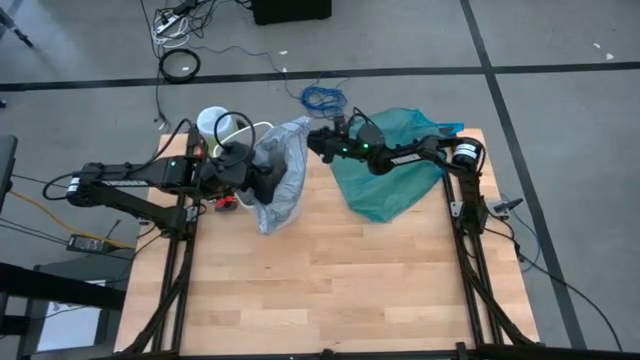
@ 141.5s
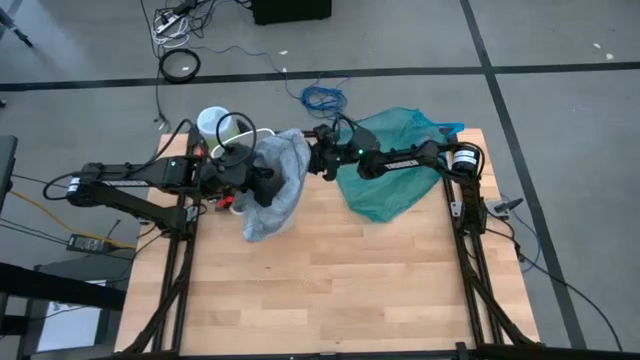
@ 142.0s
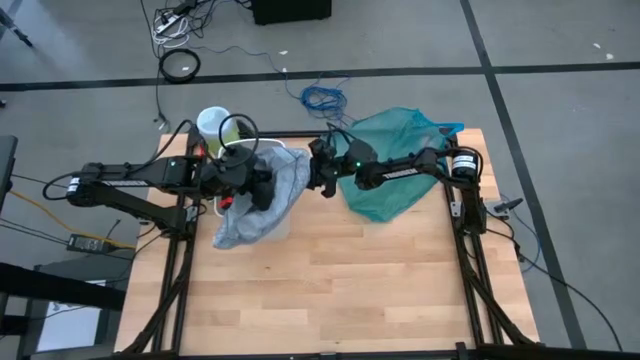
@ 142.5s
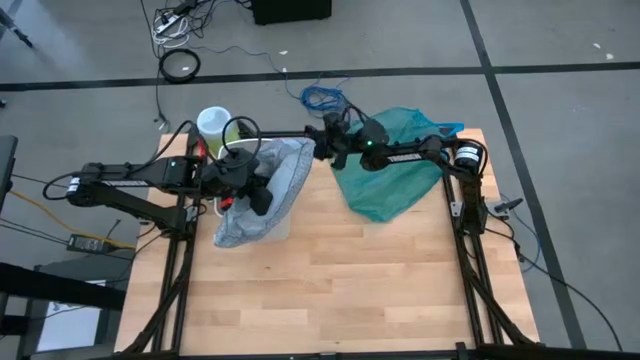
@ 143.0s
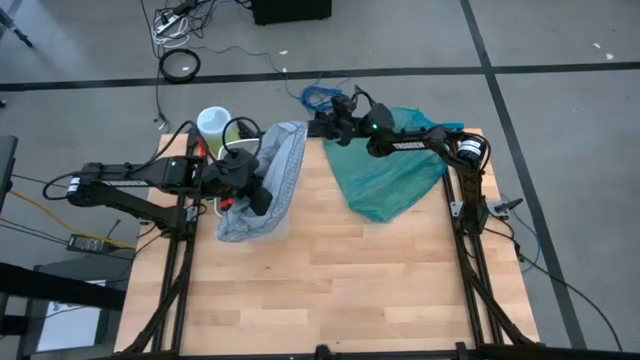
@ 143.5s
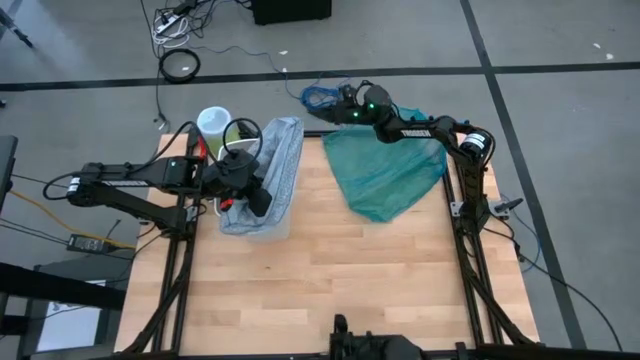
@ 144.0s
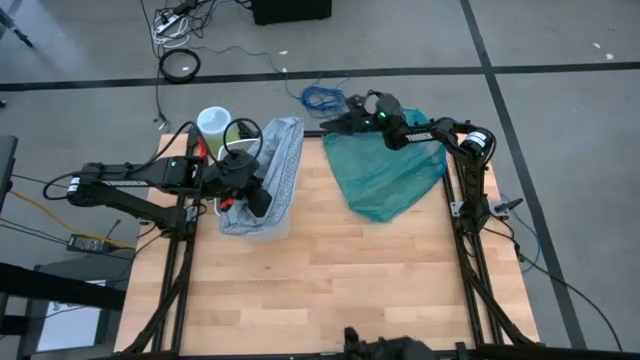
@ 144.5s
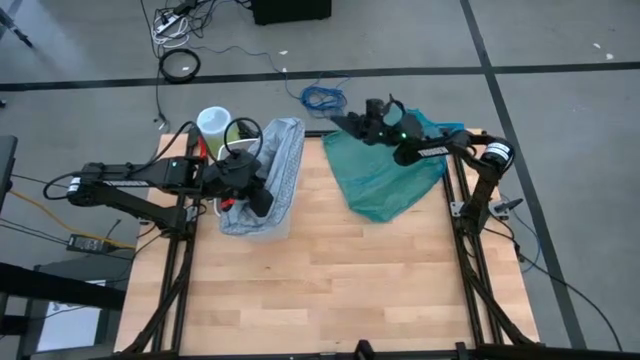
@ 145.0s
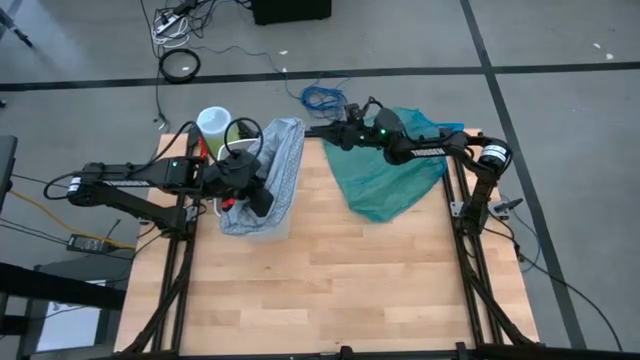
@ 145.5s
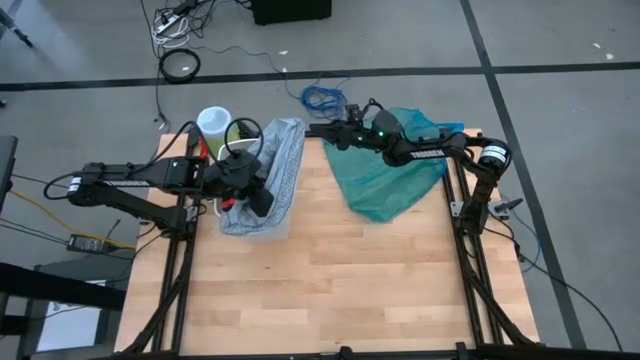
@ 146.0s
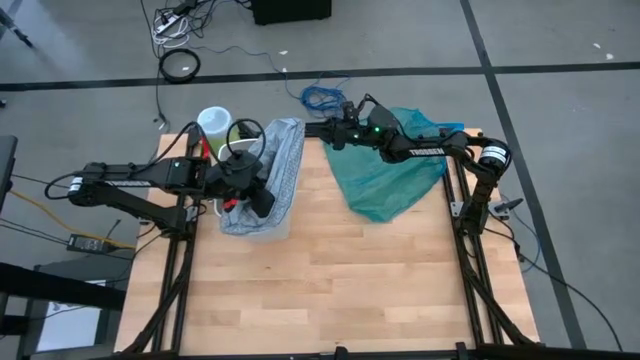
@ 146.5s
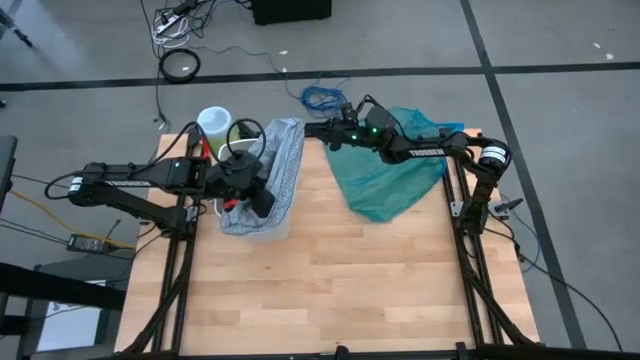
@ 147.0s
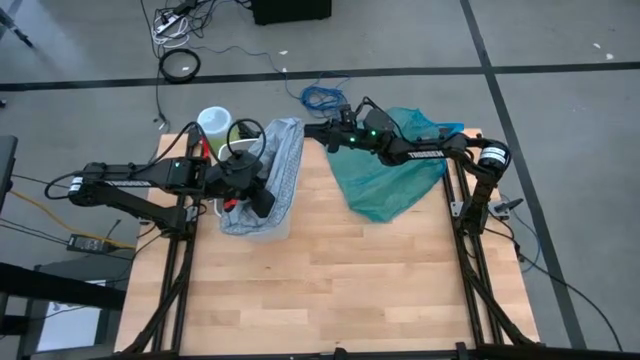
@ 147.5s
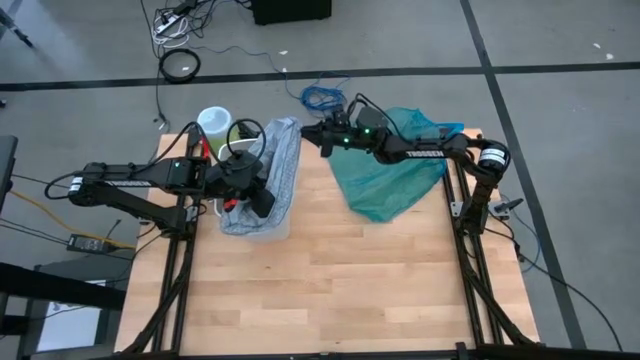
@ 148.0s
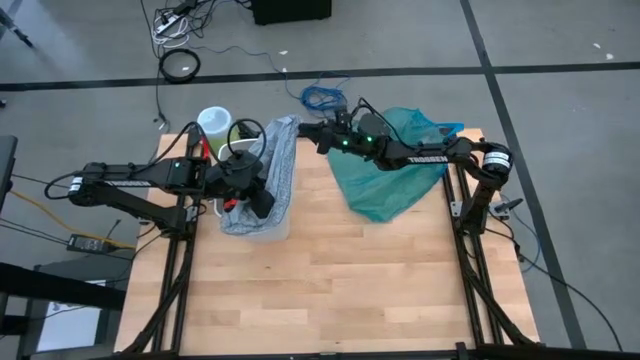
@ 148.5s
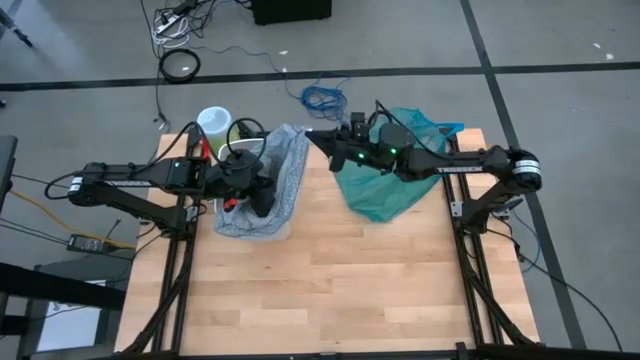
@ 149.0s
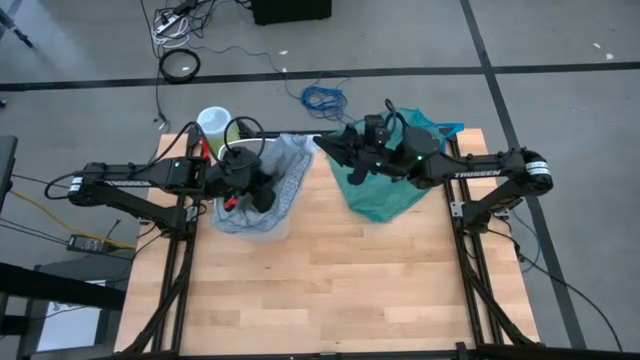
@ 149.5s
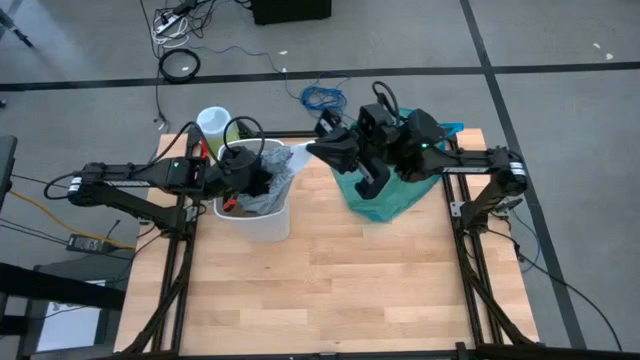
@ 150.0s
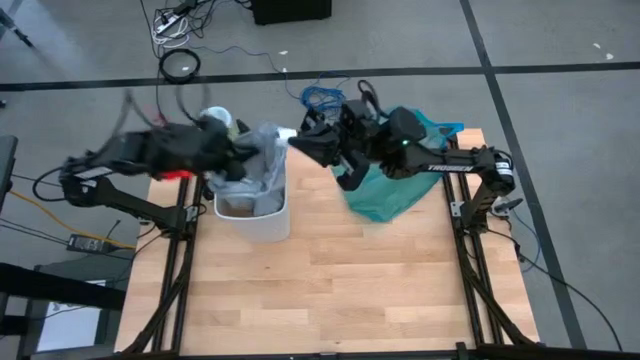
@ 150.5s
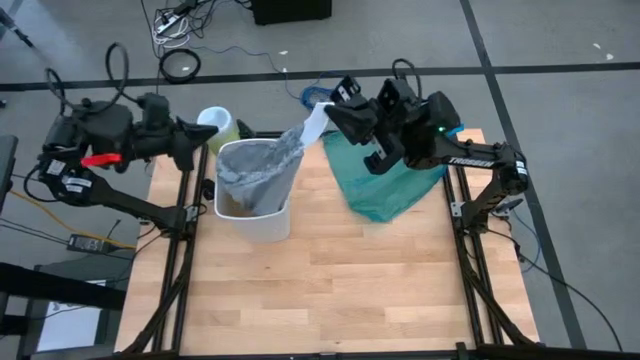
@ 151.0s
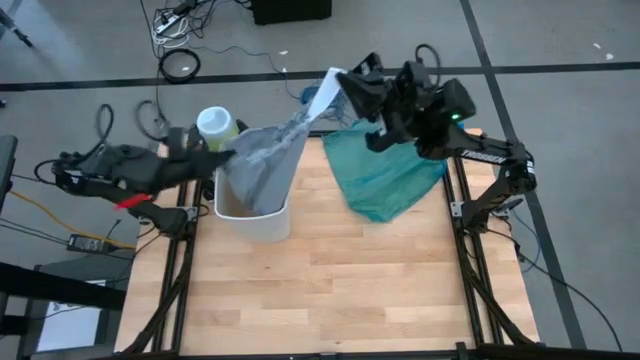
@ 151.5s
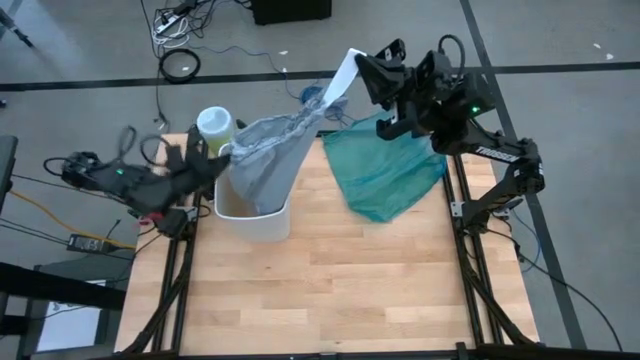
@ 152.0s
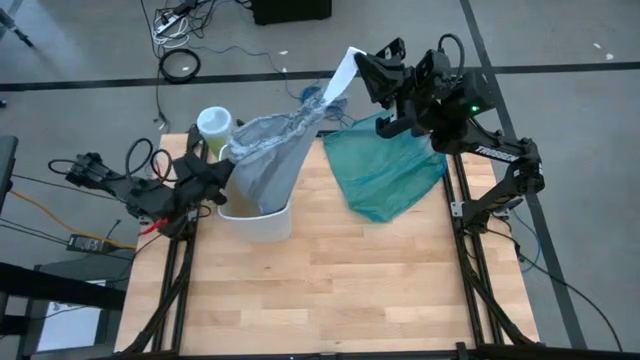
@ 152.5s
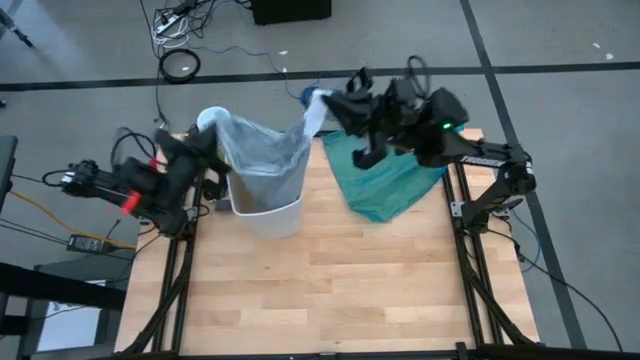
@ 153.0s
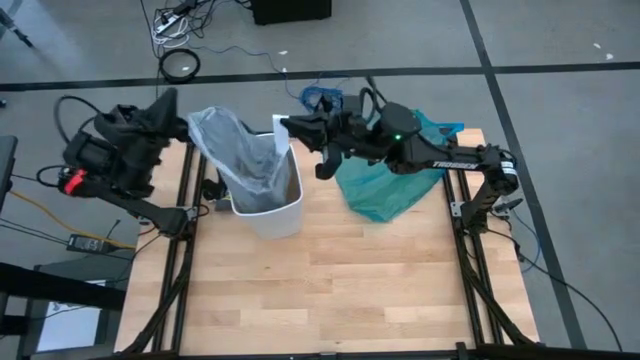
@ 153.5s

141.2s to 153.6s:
Task: place trash/remove bag and relplace
Remove the light blue trash bag from the trash bin

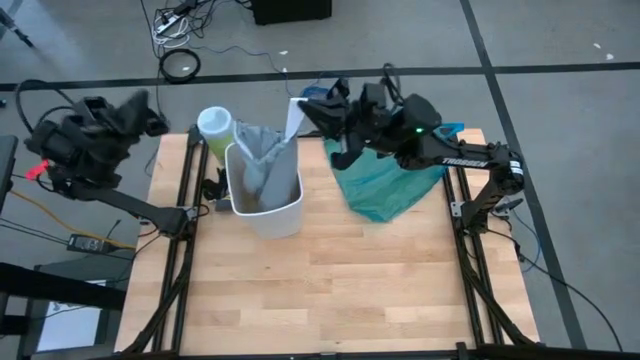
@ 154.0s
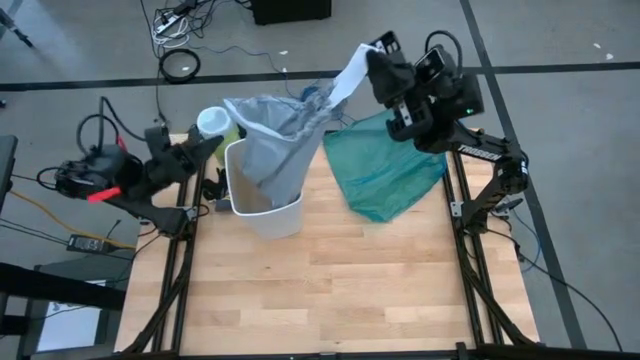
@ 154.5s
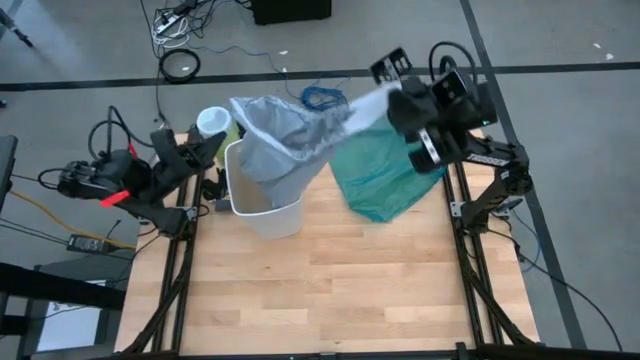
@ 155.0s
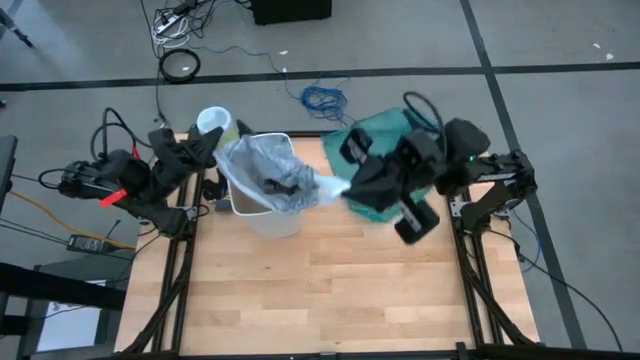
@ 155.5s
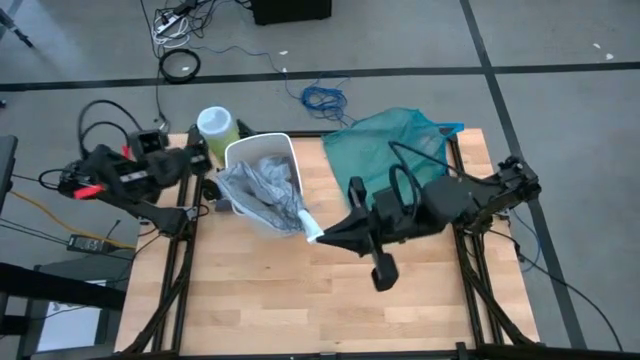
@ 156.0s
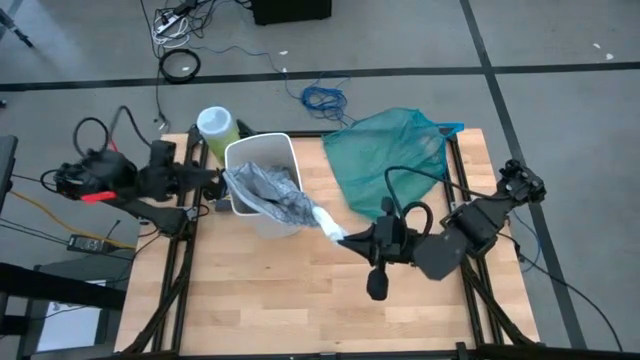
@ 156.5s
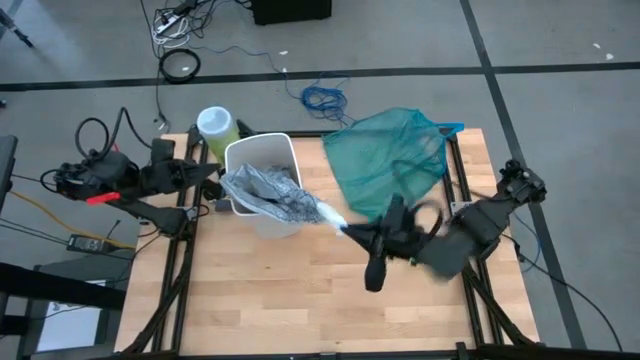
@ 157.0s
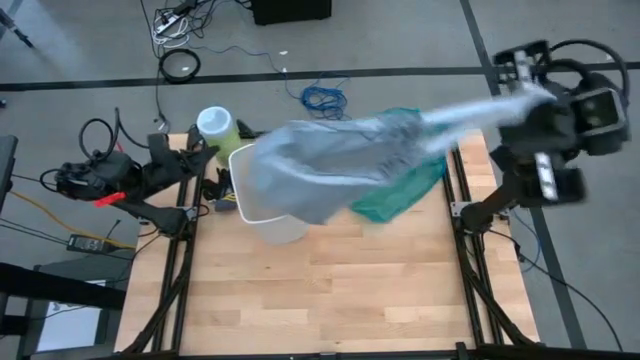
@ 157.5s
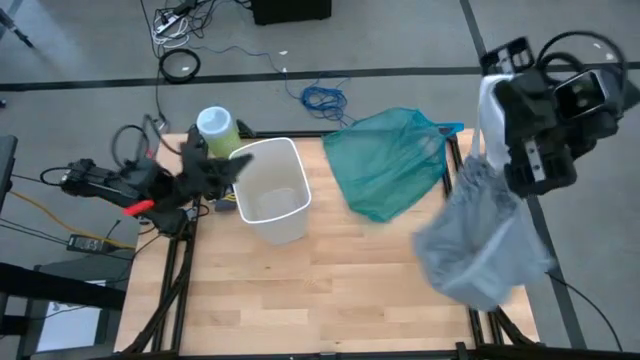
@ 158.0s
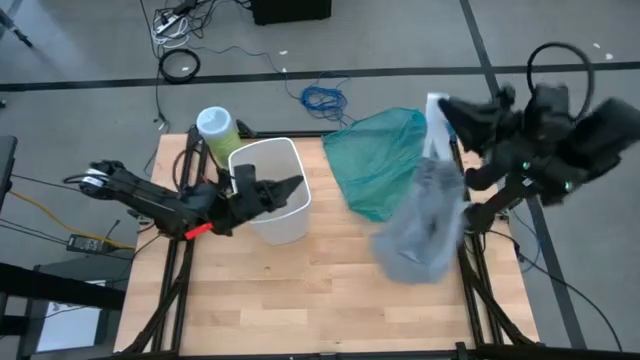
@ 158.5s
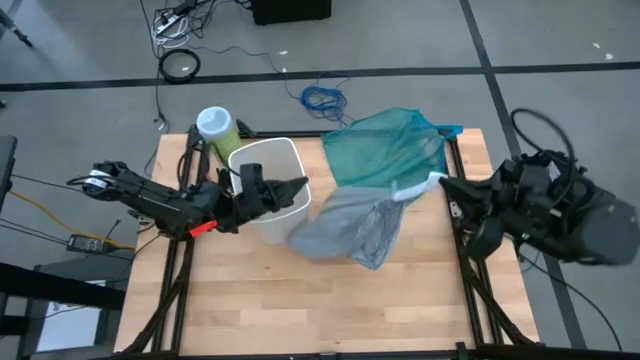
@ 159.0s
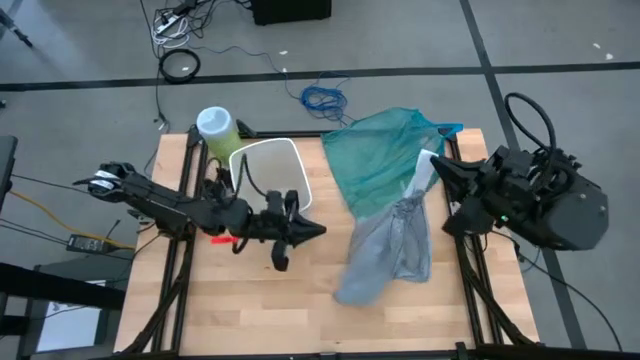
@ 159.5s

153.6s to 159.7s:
Remove the light blue trash bag from the trash bin

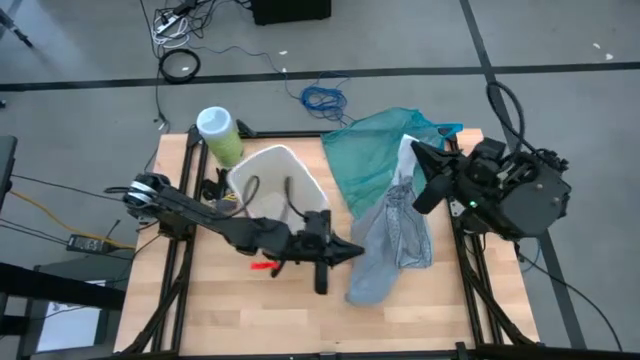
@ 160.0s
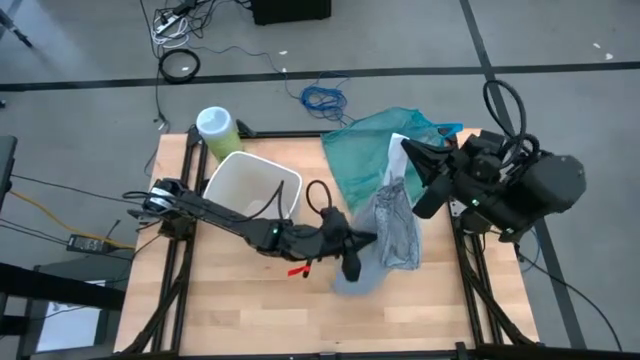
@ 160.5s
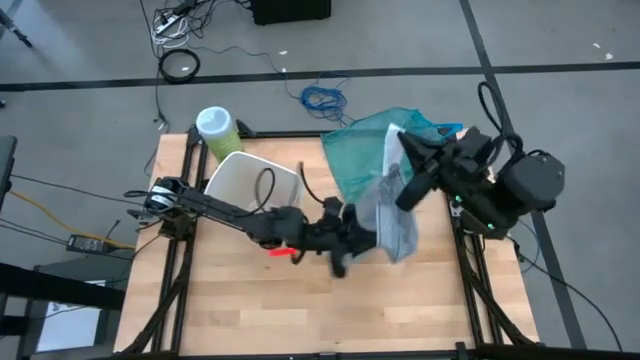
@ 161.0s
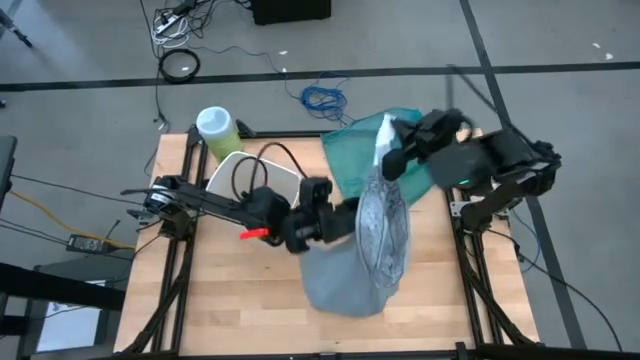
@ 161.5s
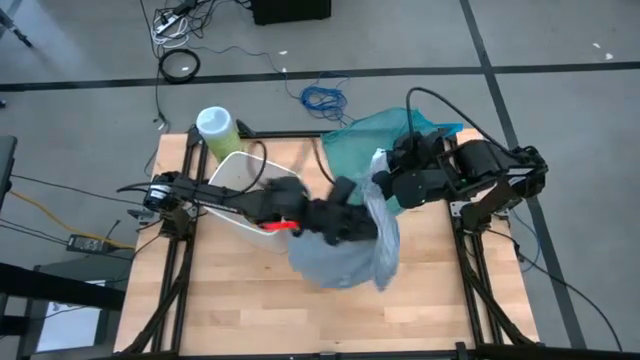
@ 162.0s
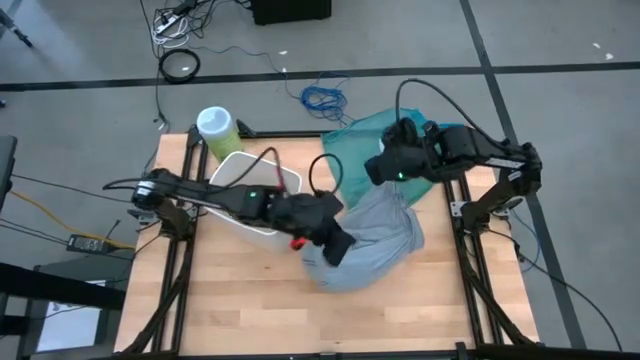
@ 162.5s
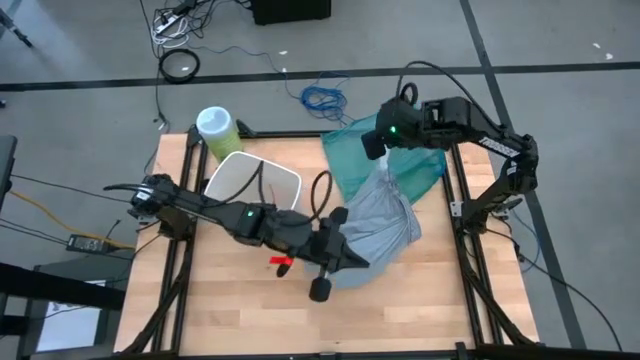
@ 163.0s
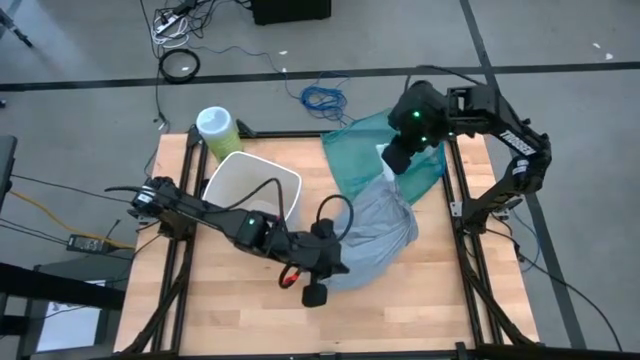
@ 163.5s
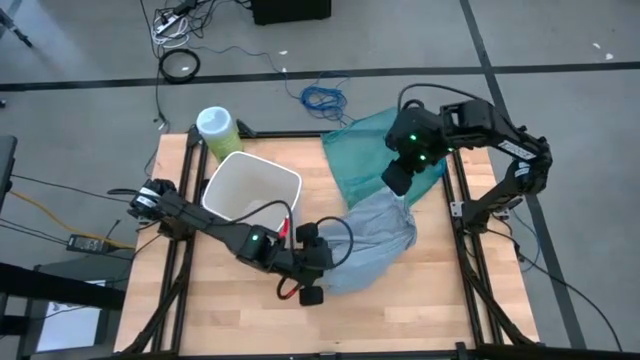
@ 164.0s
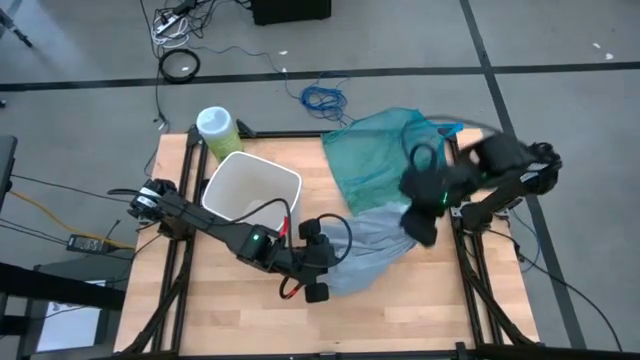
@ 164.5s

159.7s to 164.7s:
Close the light blue trash bag
